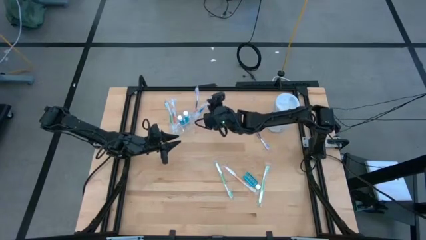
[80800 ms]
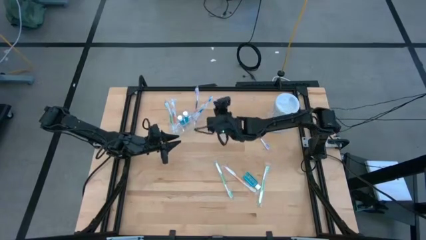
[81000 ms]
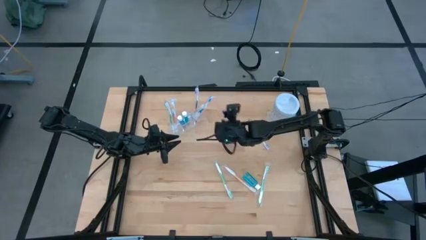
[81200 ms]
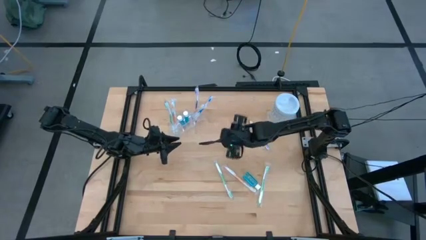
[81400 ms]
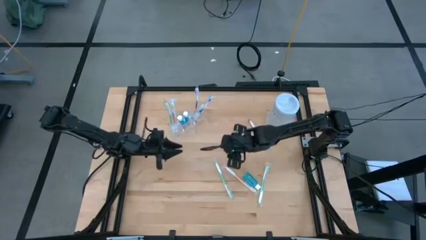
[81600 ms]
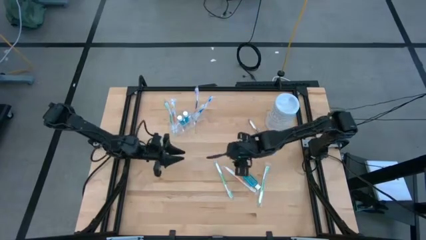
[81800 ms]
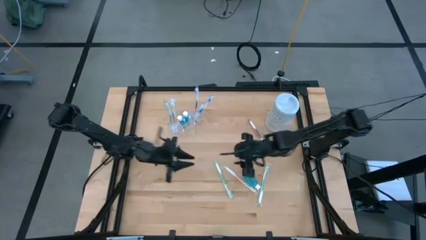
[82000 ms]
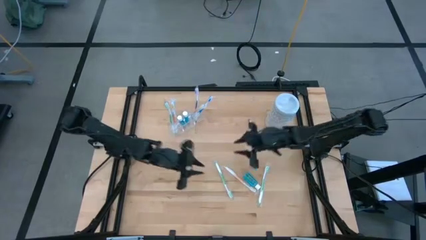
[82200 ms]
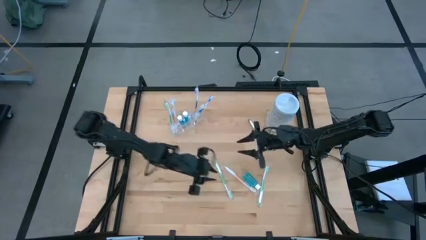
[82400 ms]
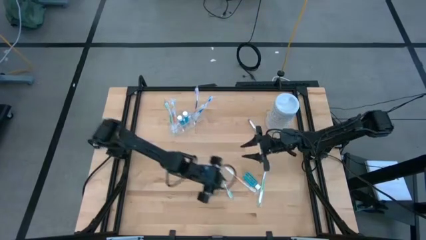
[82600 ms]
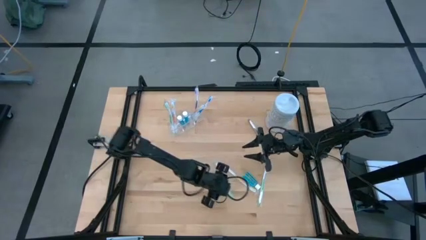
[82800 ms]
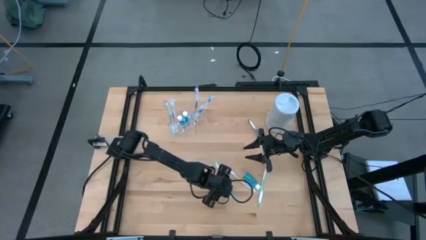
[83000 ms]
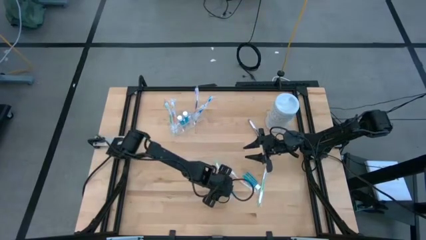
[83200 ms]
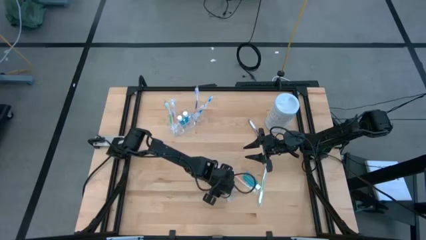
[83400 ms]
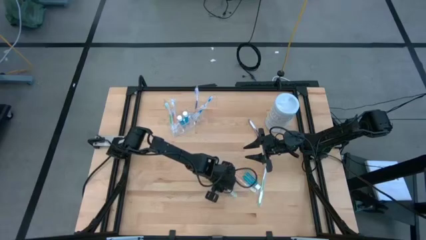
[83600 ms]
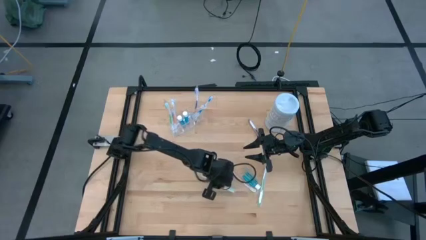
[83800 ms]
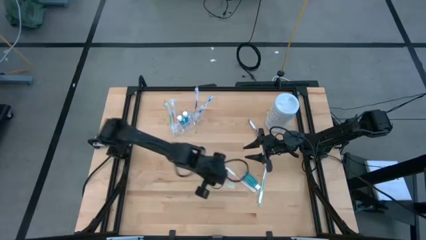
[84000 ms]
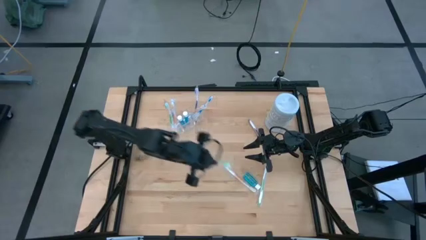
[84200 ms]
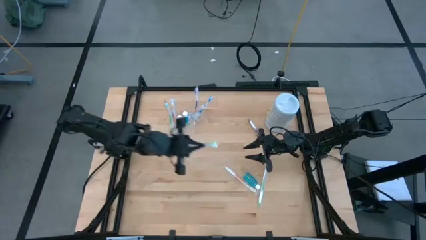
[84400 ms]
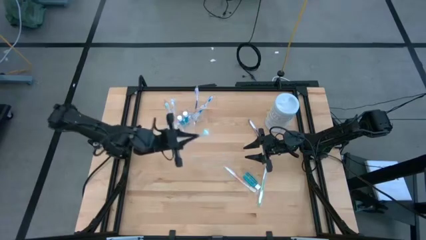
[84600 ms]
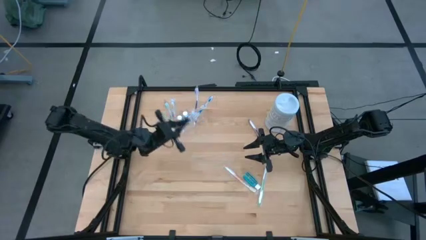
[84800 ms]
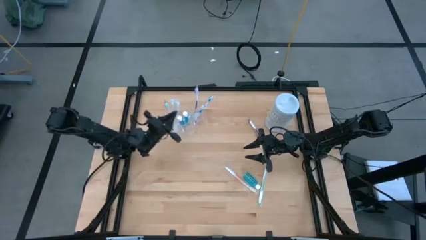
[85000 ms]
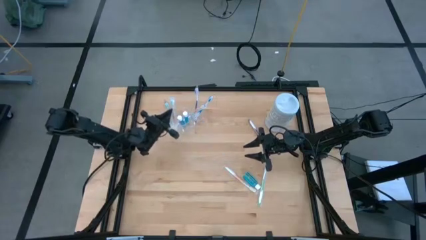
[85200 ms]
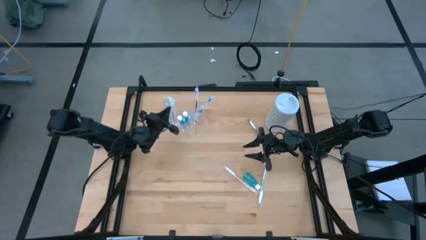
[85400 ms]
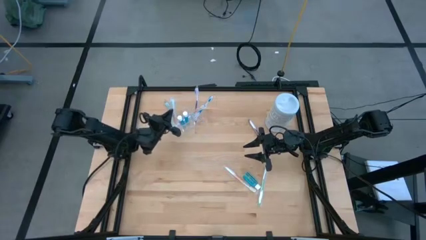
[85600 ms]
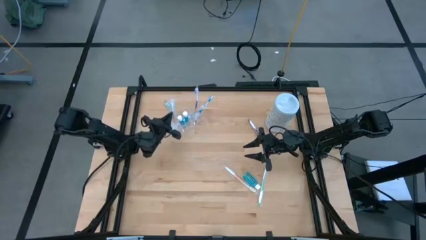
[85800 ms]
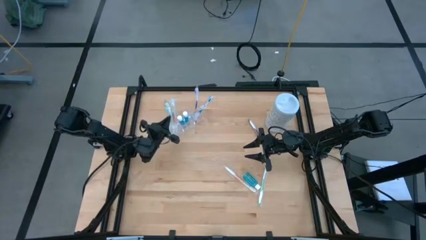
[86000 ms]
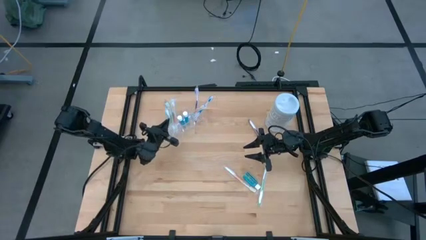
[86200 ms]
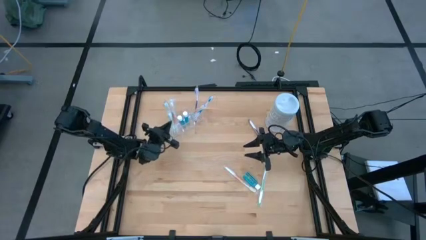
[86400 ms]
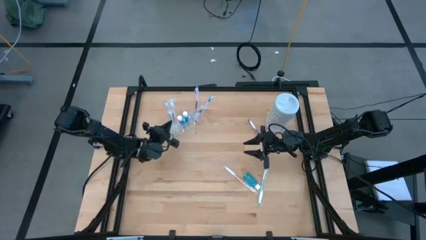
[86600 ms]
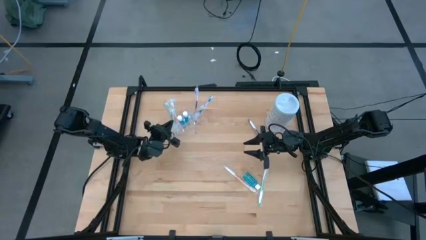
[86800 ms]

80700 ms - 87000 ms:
Task: Pick & Place toothbrushing station
Put the left green toothbrush into the transparent organizer

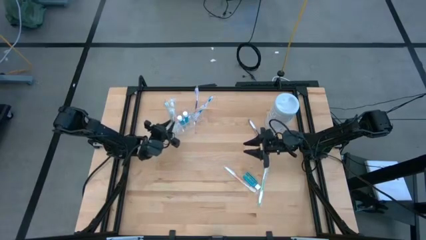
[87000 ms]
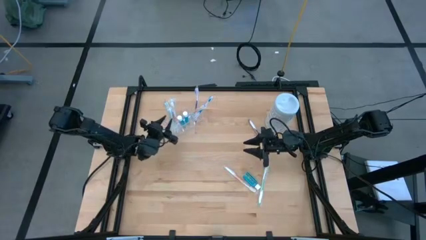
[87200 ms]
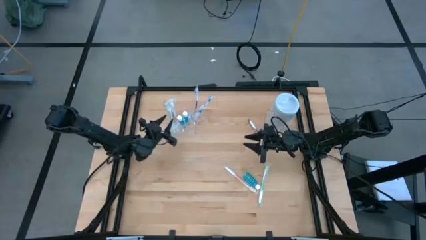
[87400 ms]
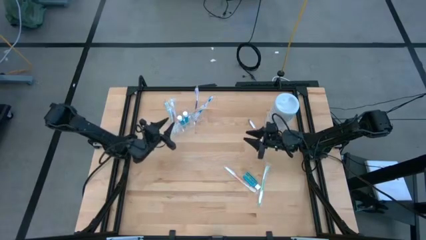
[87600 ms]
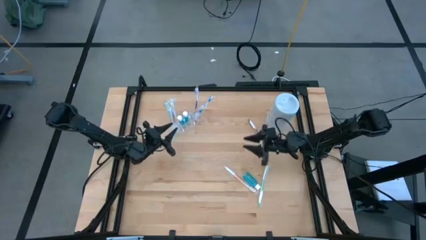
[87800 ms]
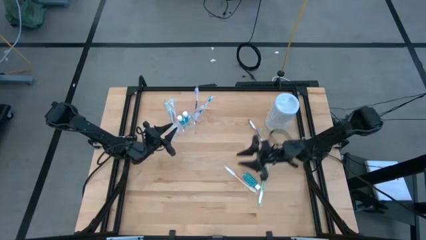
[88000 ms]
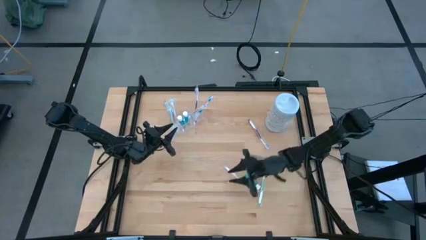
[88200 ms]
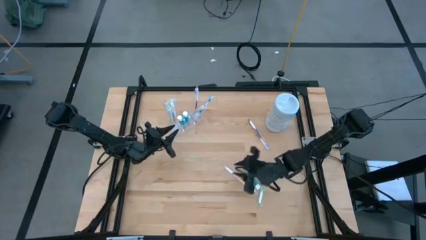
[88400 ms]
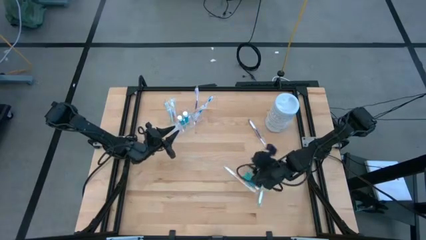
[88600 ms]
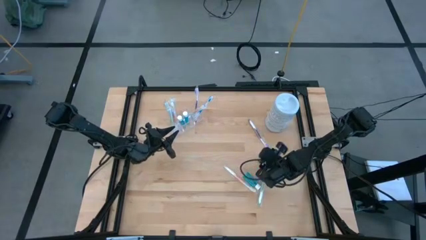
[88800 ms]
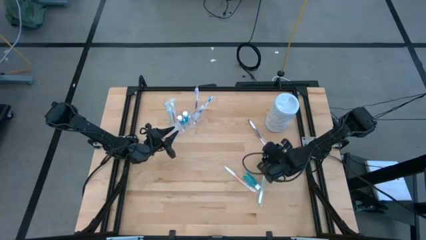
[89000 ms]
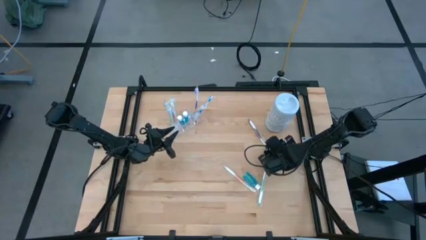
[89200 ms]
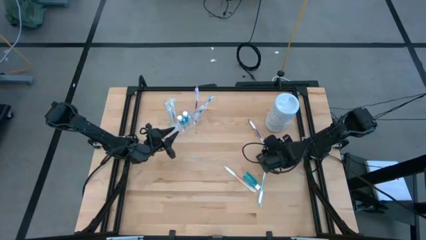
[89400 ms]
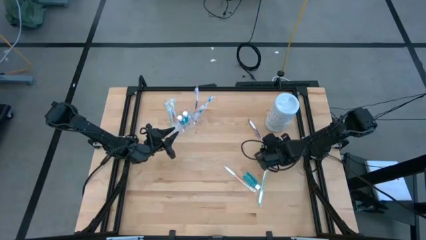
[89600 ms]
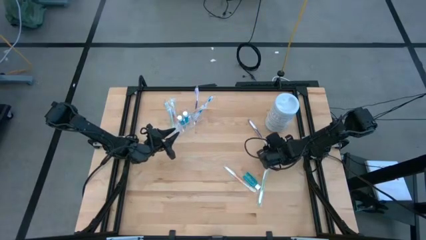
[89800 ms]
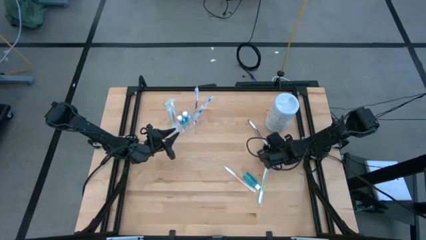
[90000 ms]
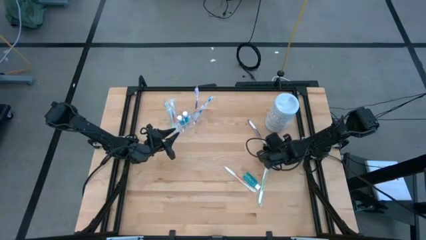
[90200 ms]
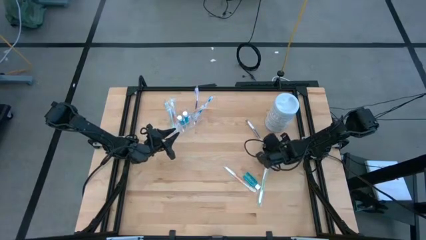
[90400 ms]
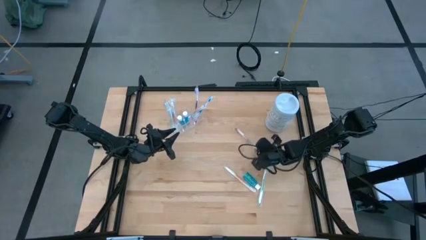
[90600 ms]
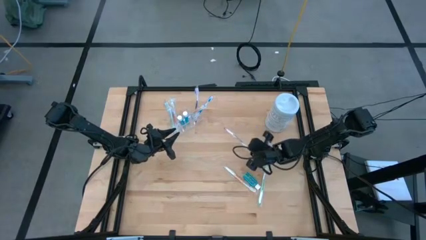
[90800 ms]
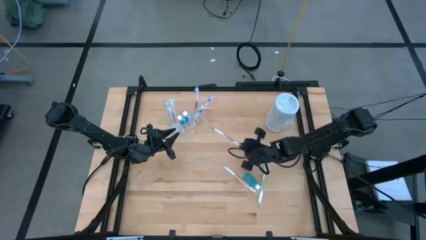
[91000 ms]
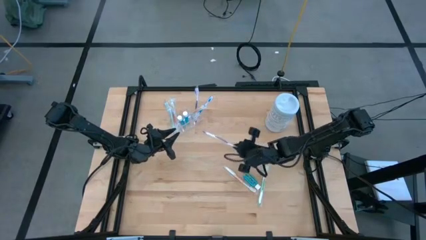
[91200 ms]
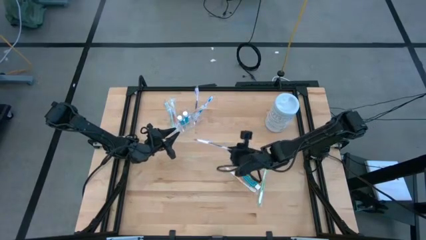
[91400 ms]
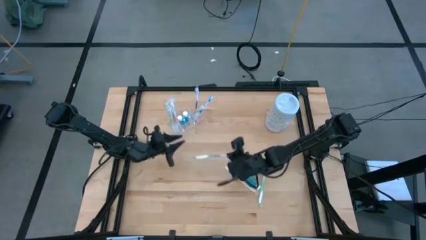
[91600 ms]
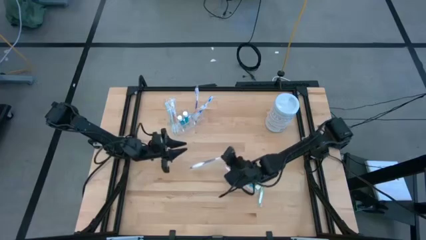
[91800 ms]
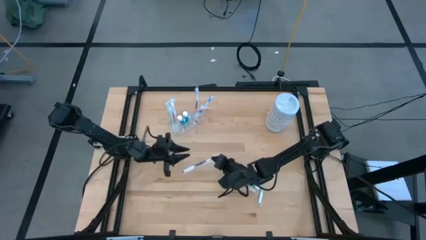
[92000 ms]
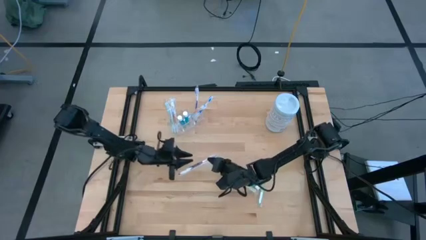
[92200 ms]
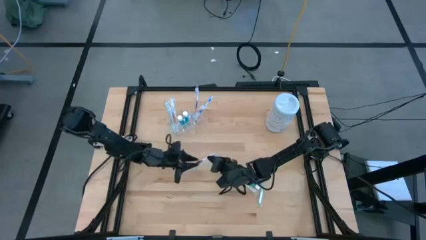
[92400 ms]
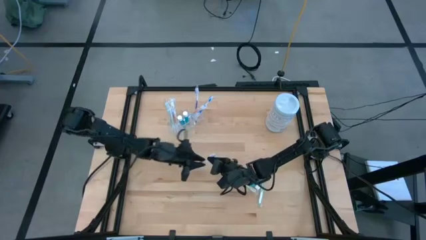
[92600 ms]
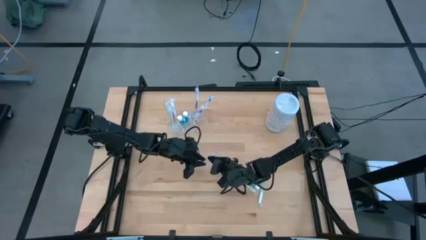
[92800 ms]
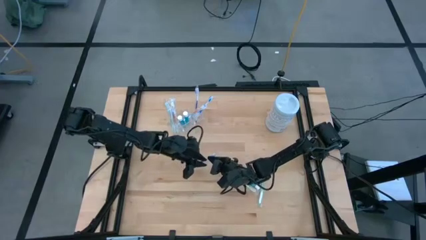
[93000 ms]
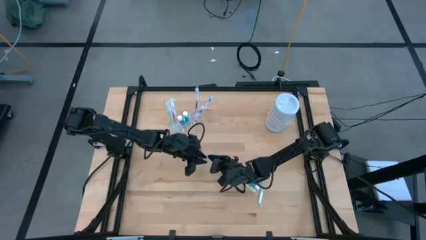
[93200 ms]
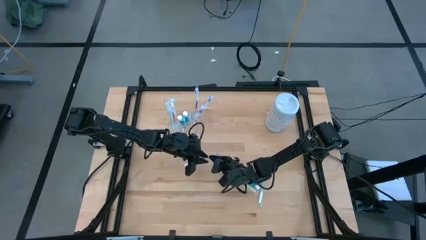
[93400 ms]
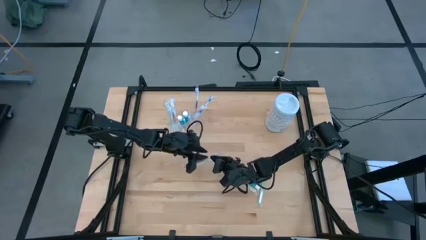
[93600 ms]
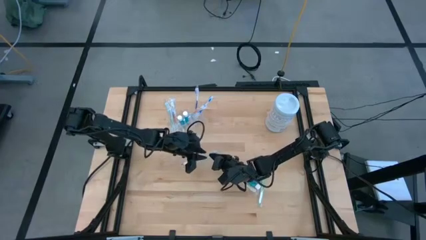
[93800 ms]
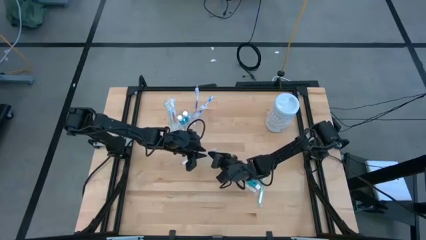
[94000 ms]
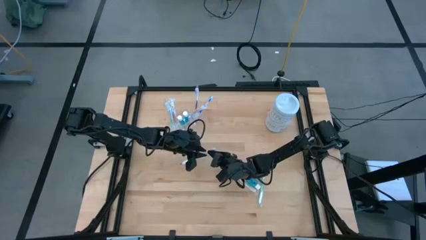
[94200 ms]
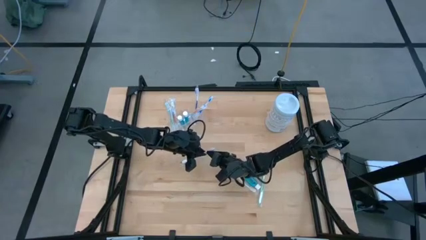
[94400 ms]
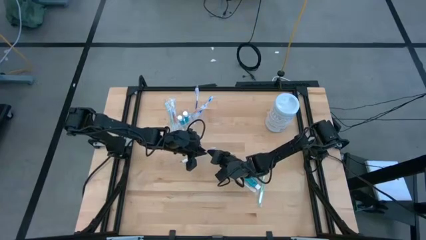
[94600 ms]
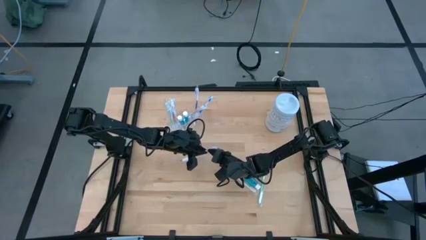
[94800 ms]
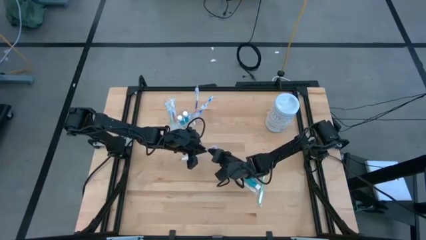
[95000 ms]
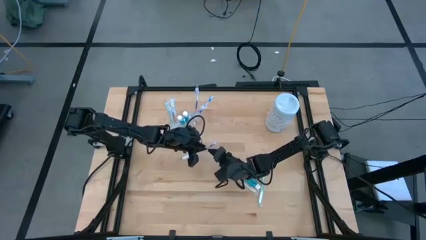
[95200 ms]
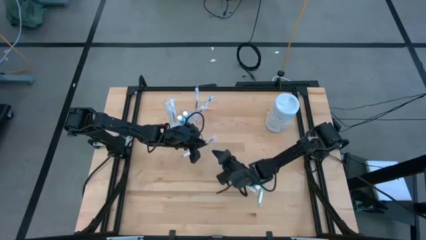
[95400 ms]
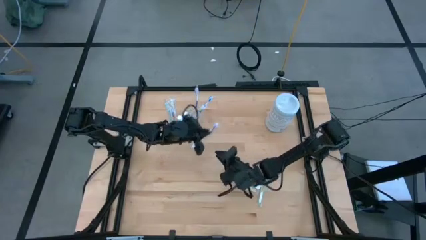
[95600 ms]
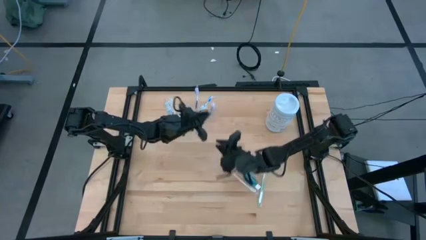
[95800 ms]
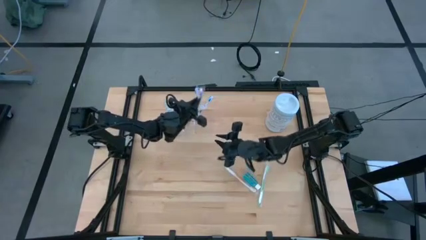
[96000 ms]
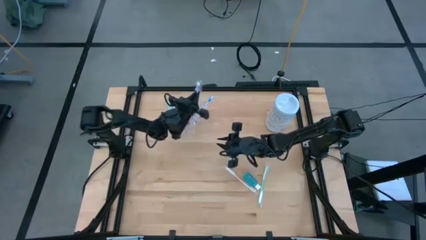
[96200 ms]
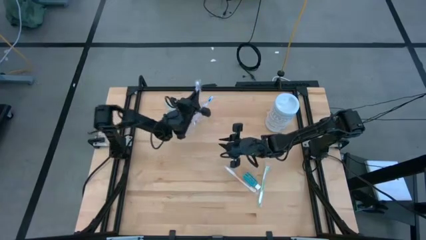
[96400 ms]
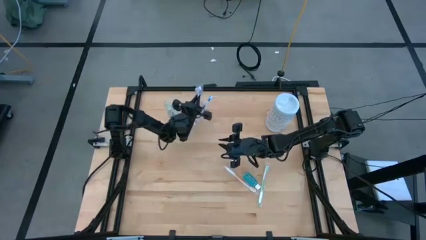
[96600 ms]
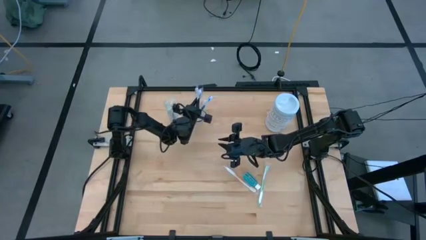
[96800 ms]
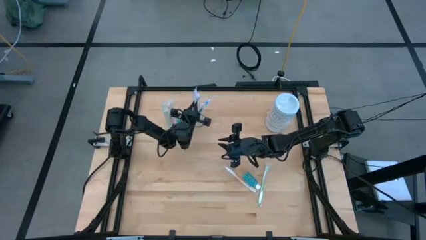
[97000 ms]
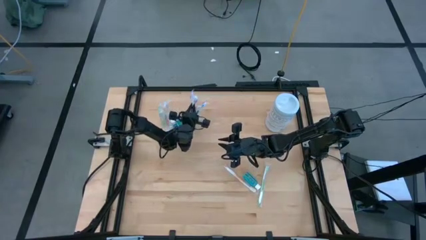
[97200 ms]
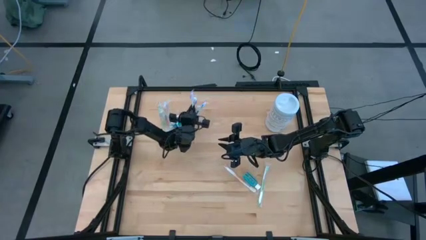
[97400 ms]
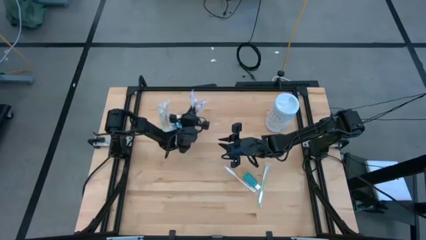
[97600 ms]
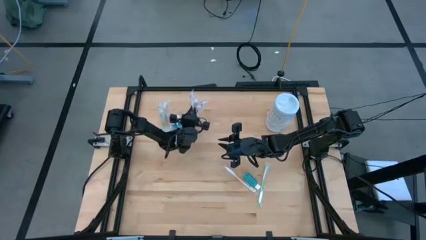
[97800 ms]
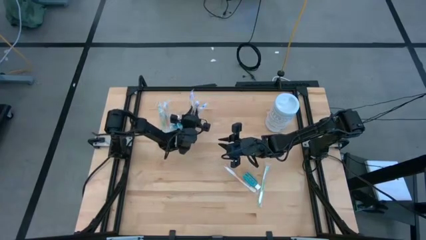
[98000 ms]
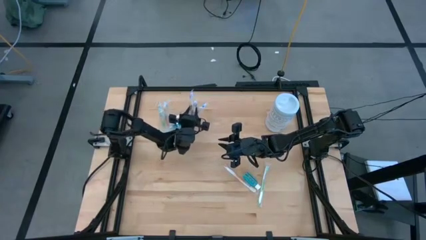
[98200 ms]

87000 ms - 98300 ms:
Put the purple toothbrush into the transparent organizer
